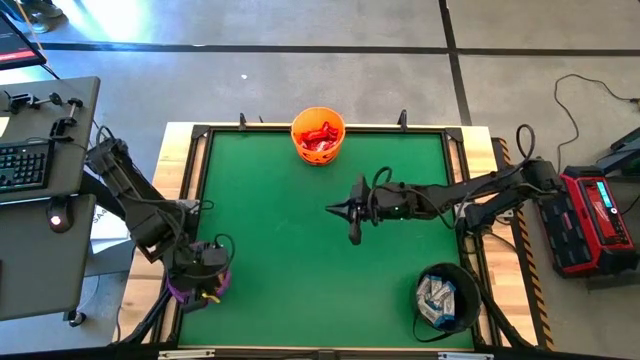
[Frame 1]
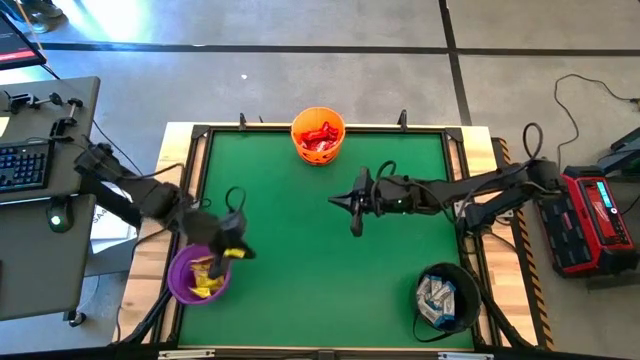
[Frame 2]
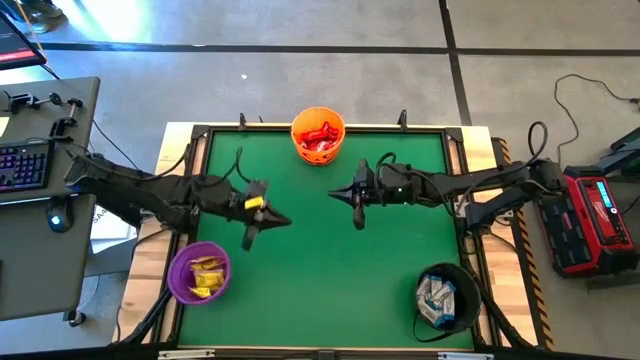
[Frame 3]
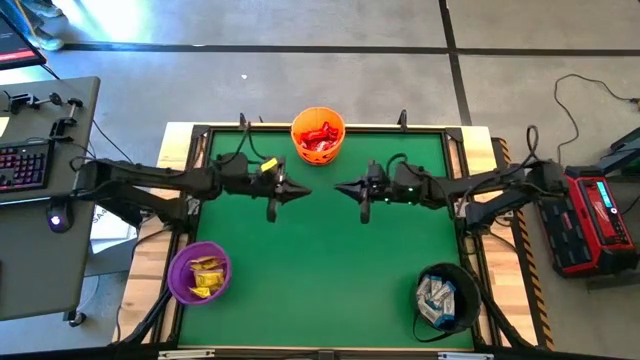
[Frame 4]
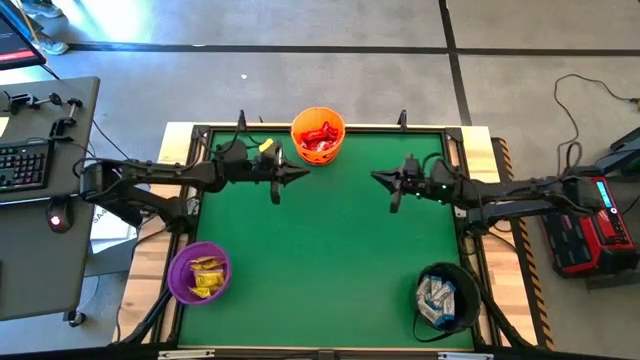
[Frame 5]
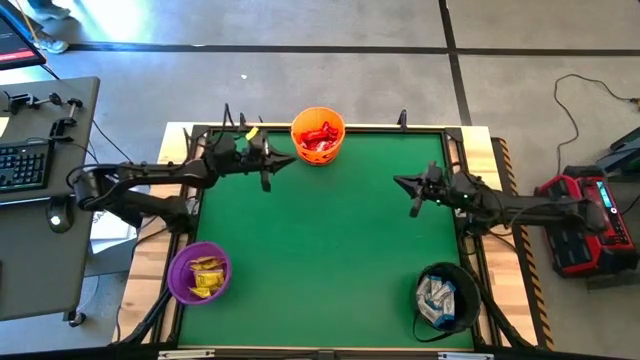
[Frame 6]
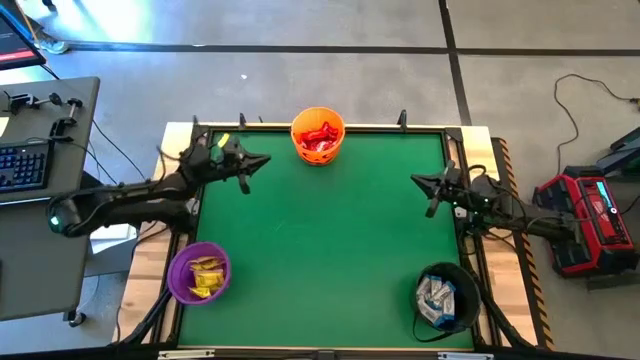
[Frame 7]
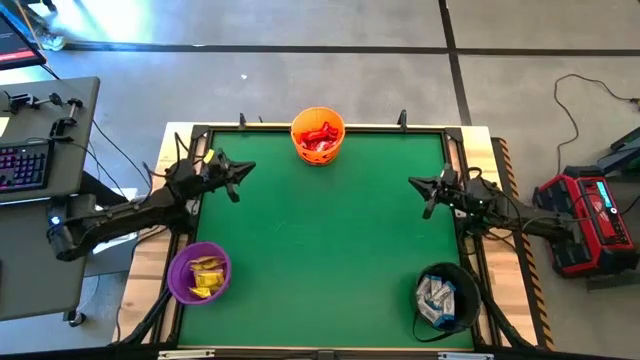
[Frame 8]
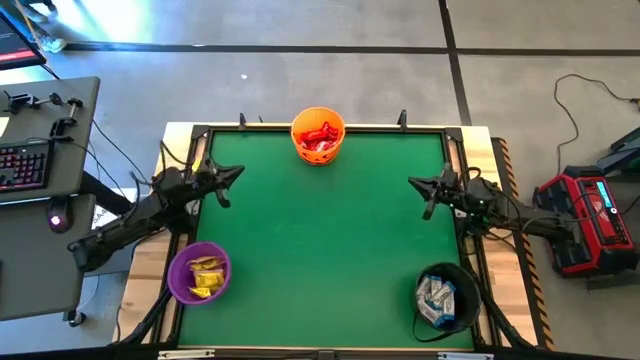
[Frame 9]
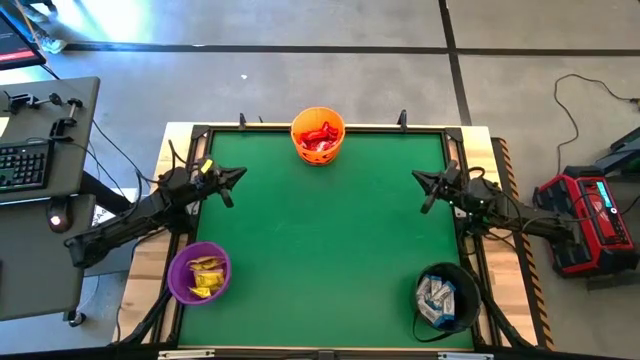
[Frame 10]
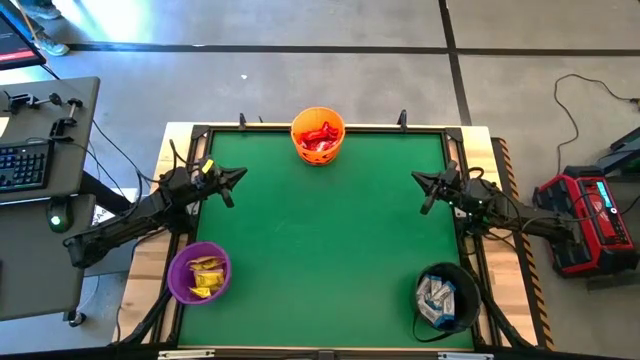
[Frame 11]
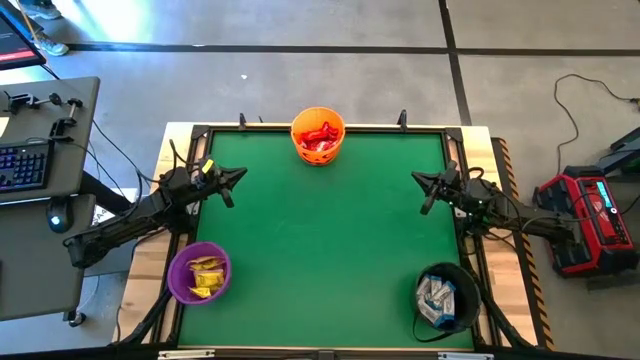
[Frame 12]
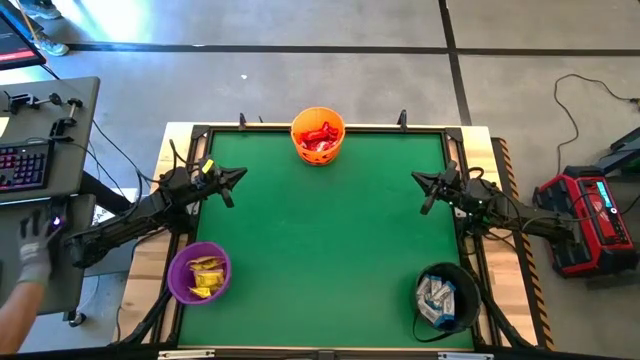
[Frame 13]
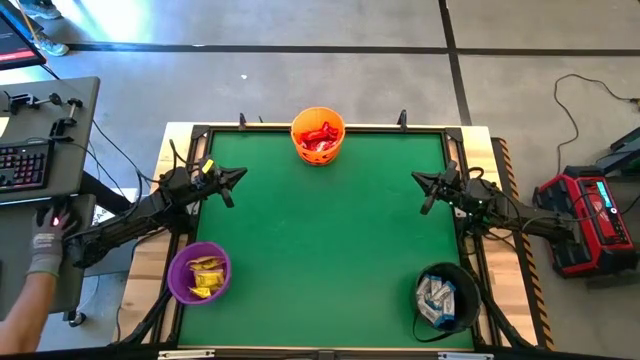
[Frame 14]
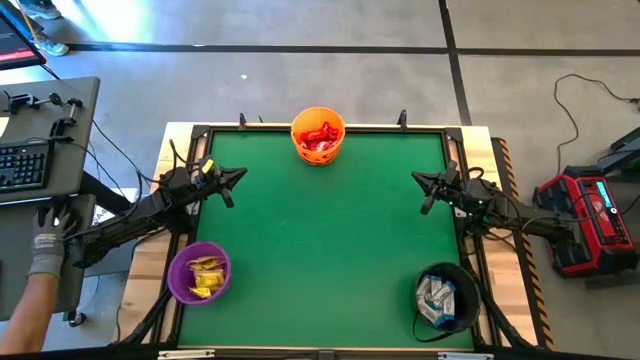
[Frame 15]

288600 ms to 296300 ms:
Task: Sort candy by brand, put in halloween buckets
Return to Home Position

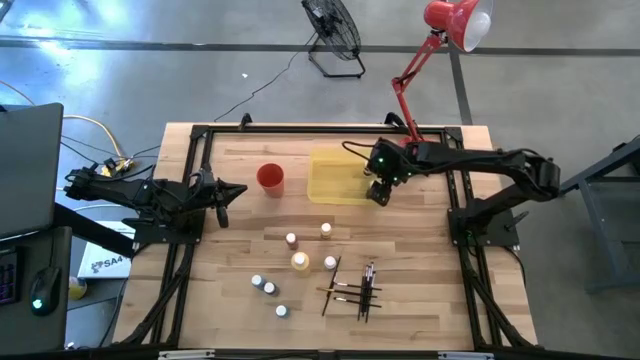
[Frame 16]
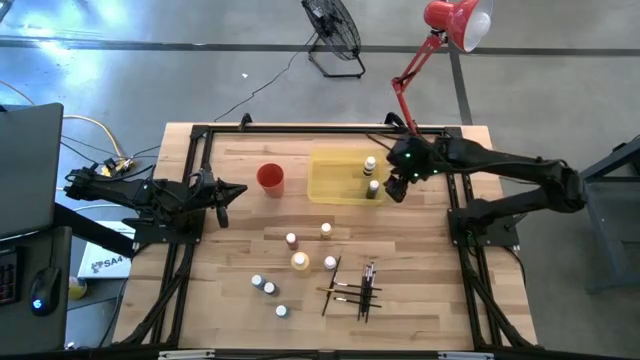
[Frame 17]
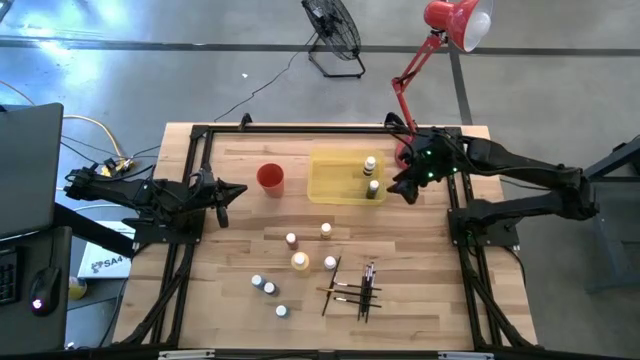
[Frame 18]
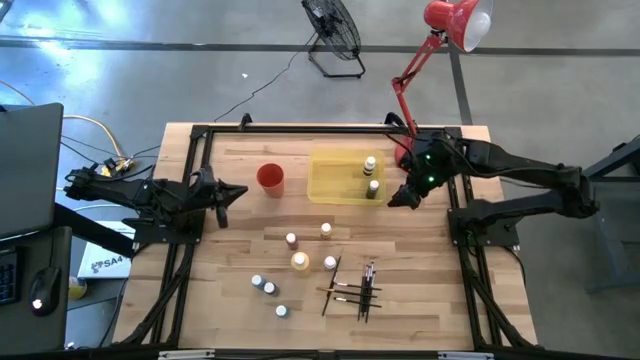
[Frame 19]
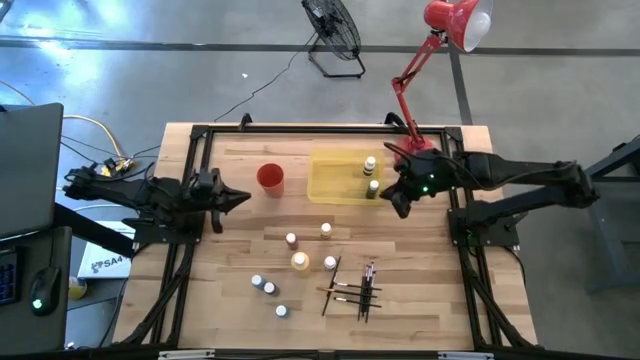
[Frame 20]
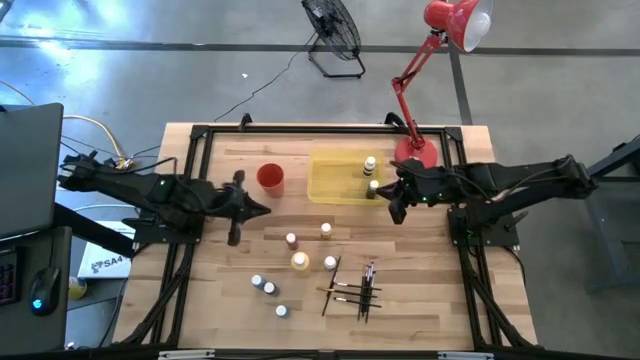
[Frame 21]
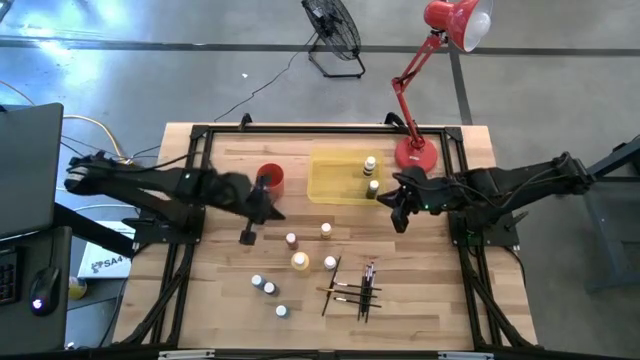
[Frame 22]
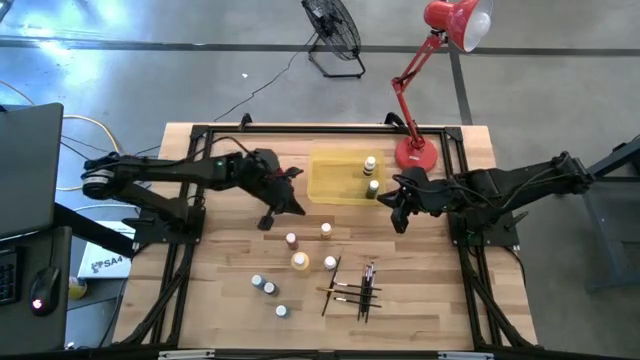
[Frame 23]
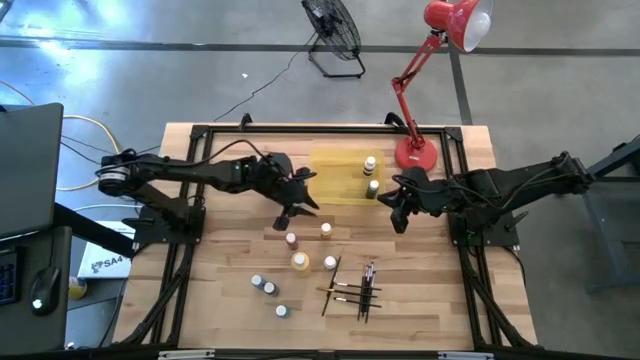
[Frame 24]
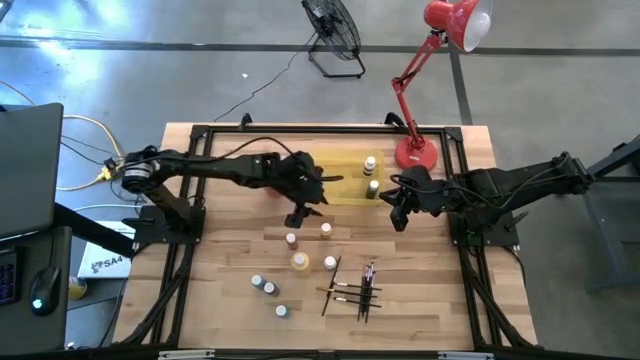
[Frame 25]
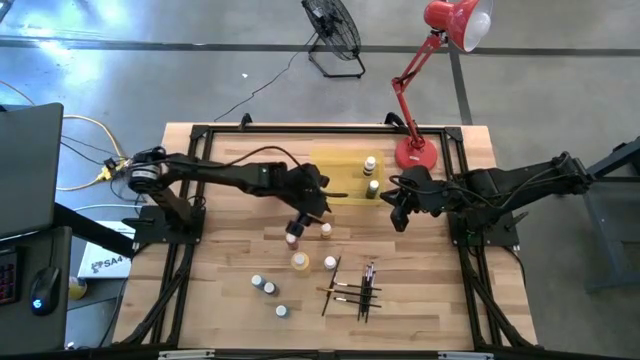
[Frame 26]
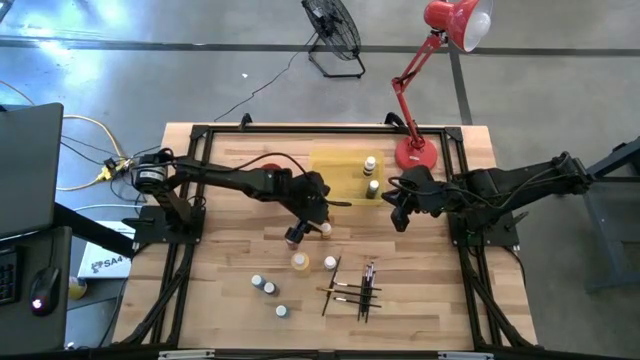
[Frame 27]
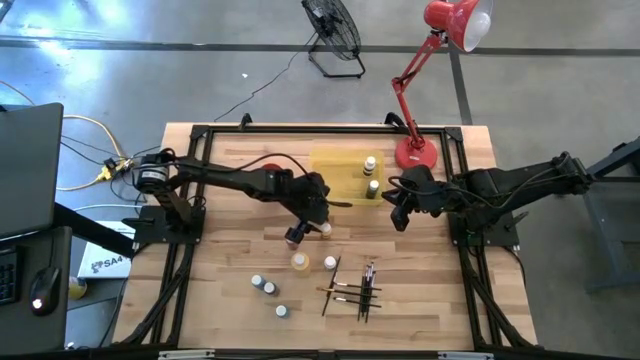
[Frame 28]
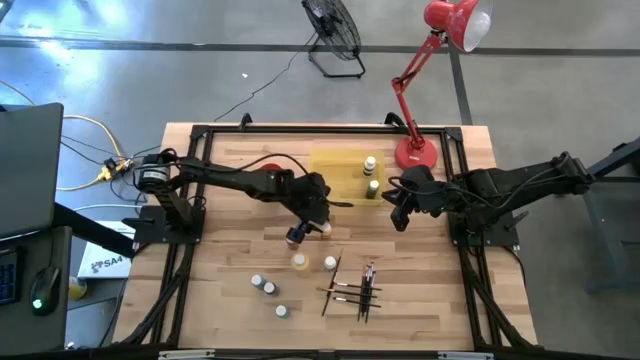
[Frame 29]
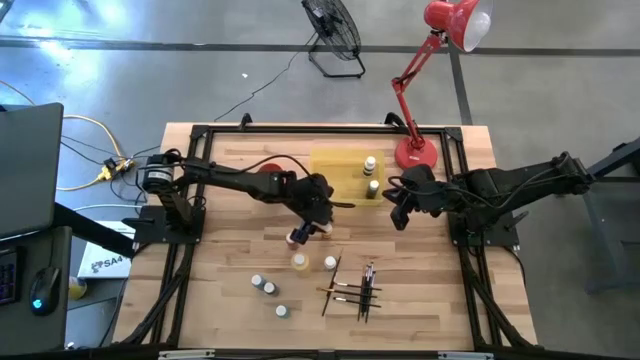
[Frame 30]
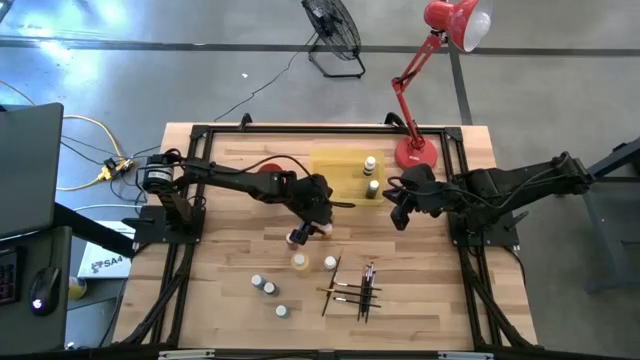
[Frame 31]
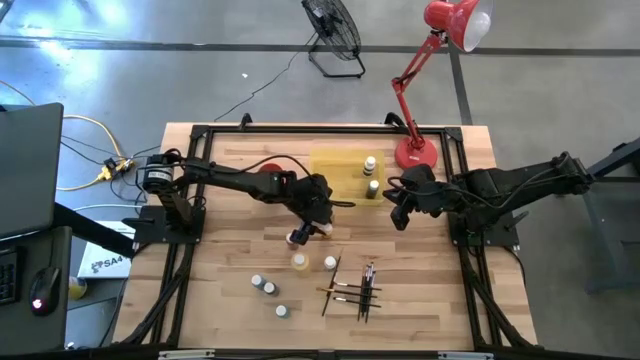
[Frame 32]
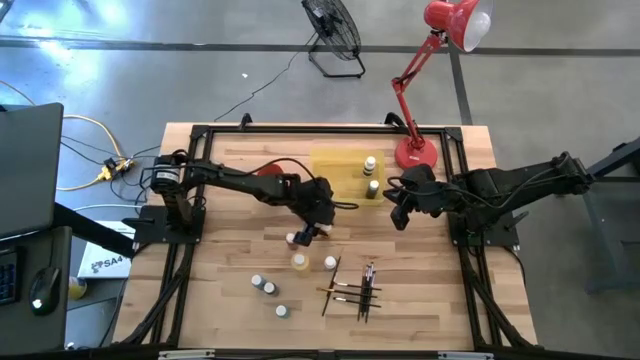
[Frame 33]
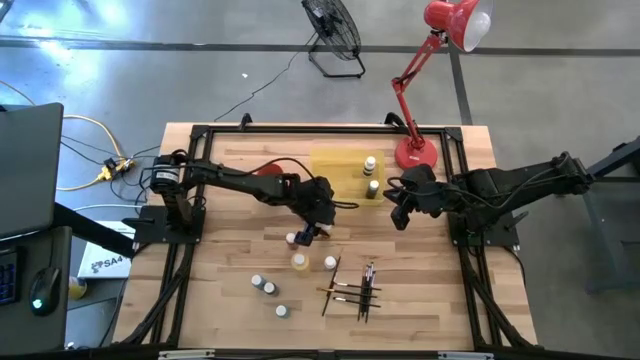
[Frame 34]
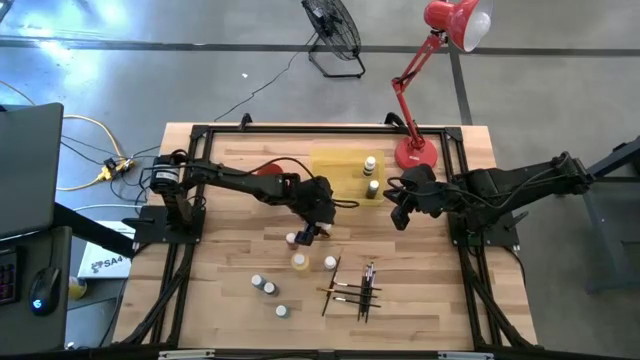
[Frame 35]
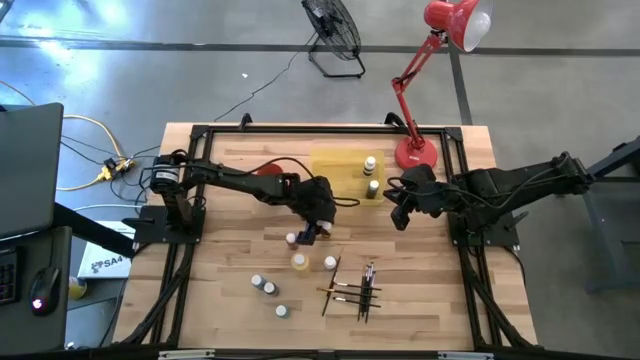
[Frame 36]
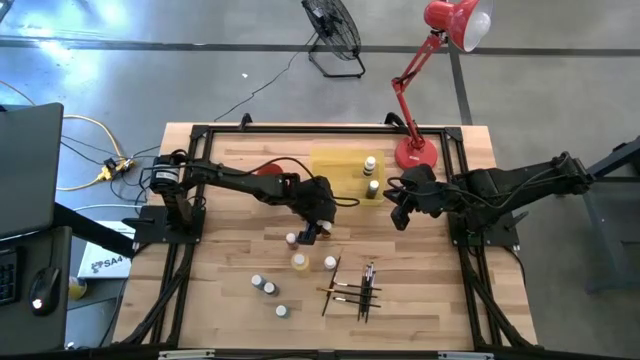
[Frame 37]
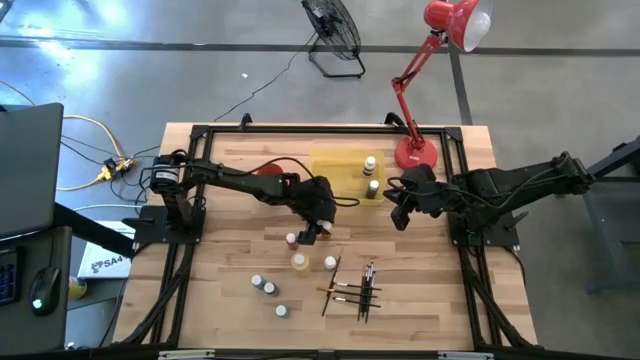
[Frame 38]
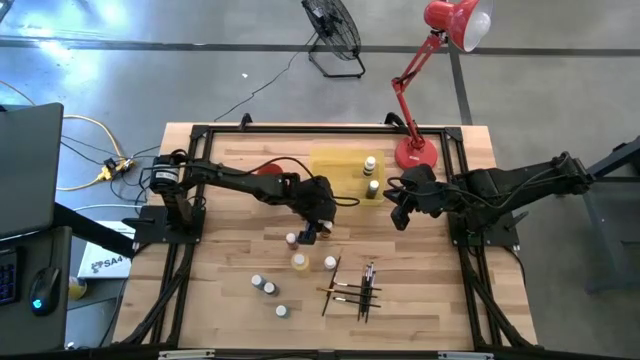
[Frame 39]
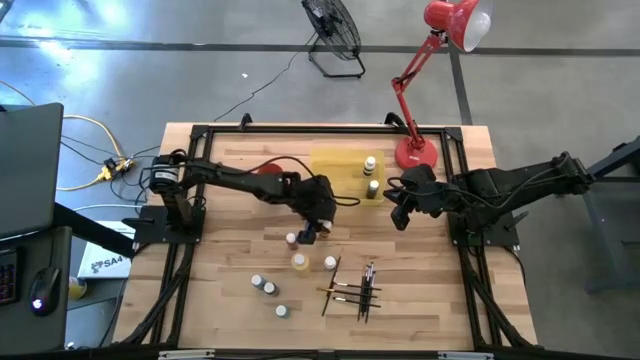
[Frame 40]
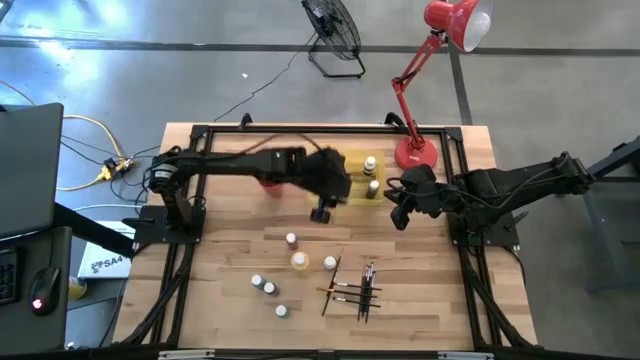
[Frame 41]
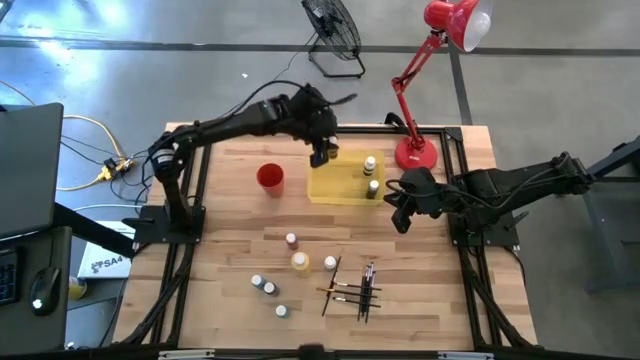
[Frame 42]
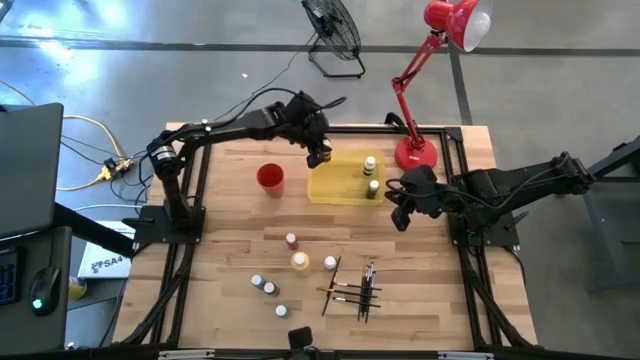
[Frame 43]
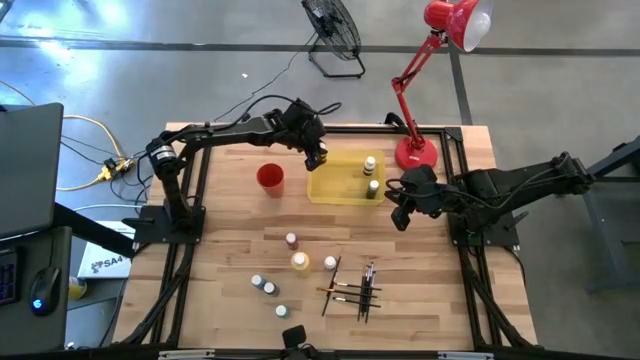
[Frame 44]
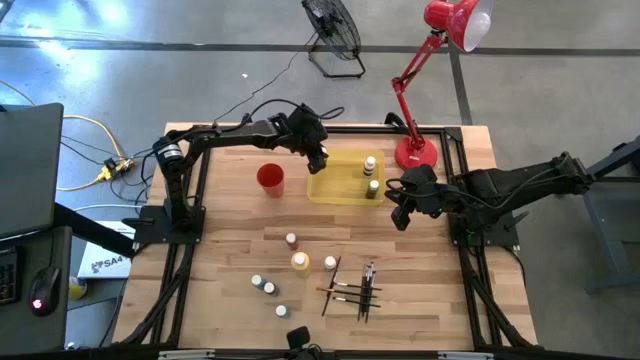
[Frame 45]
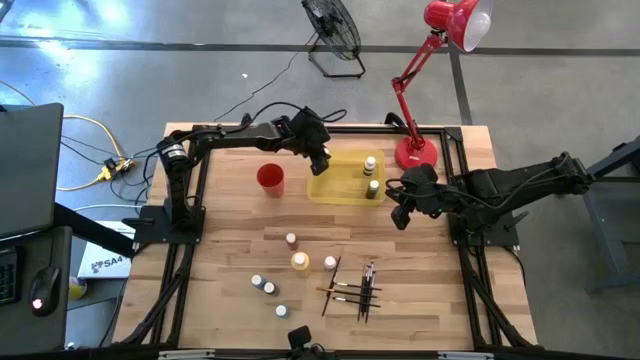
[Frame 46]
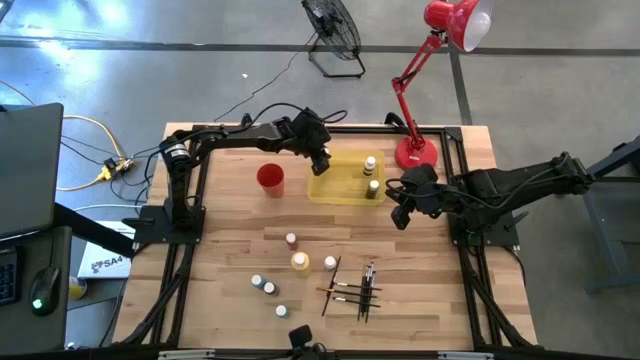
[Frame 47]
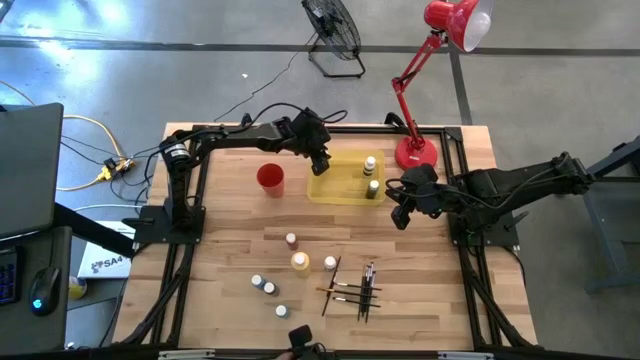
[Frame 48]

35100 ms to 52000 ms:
Task: Pick & Place Paint Supplies
Put the yellow paint bottle into the yellow bin
